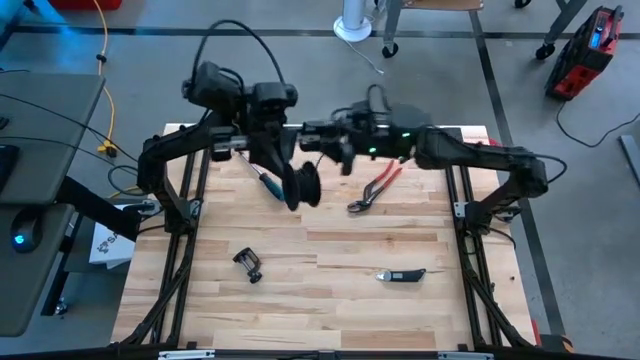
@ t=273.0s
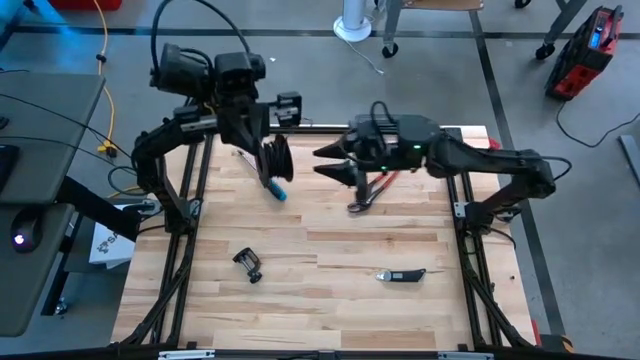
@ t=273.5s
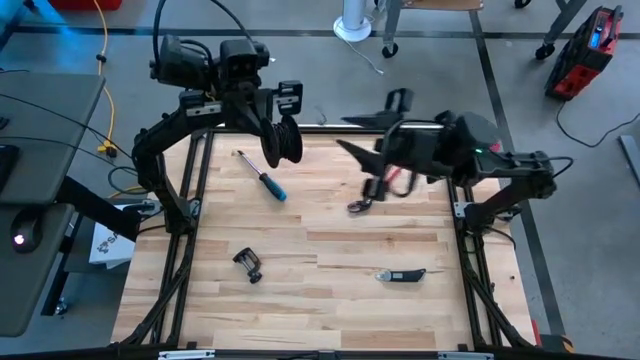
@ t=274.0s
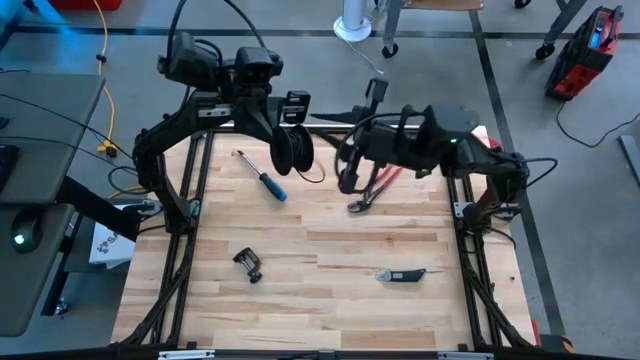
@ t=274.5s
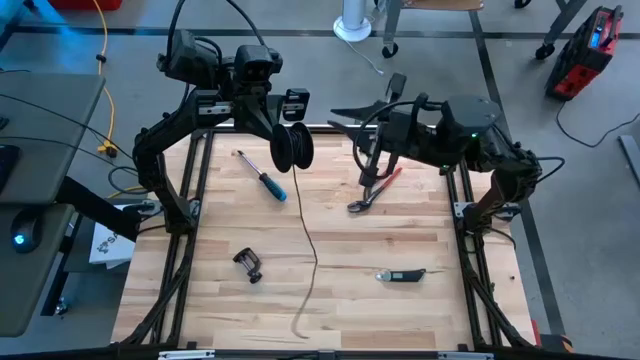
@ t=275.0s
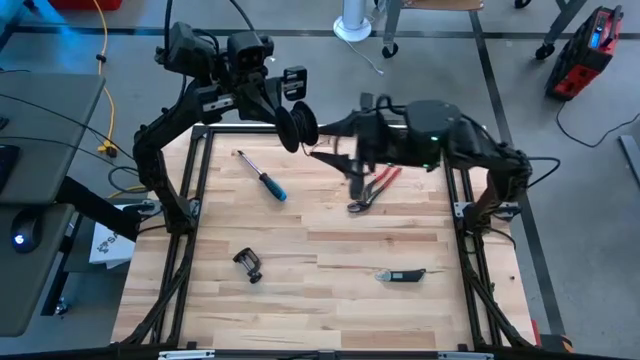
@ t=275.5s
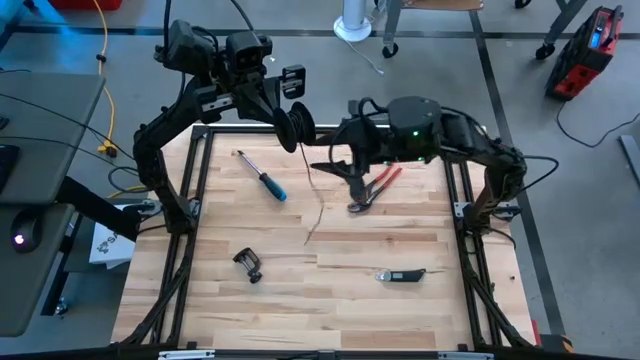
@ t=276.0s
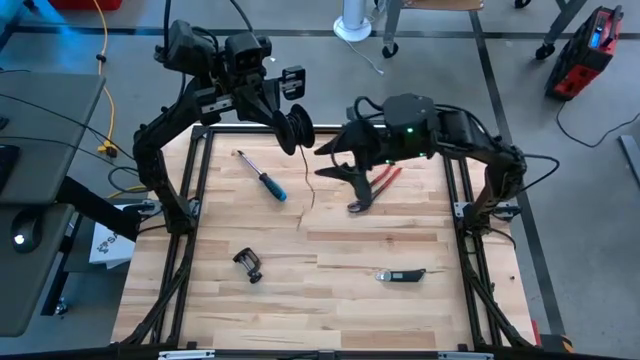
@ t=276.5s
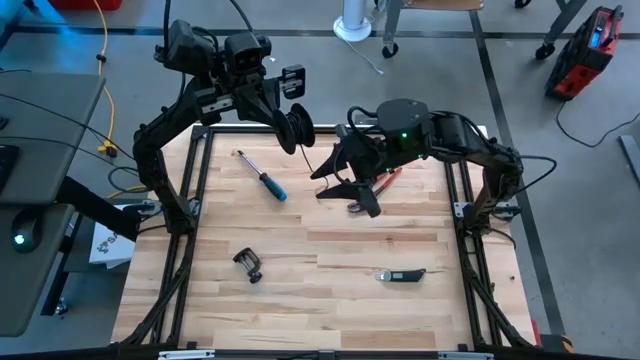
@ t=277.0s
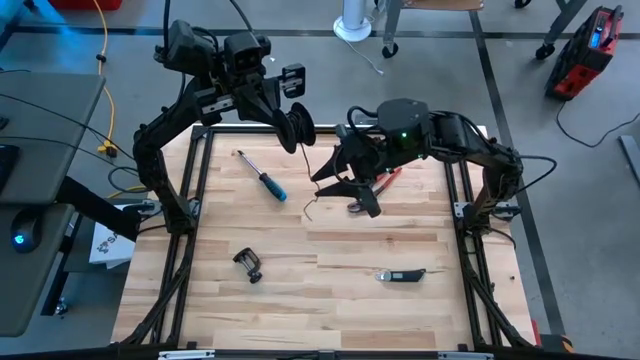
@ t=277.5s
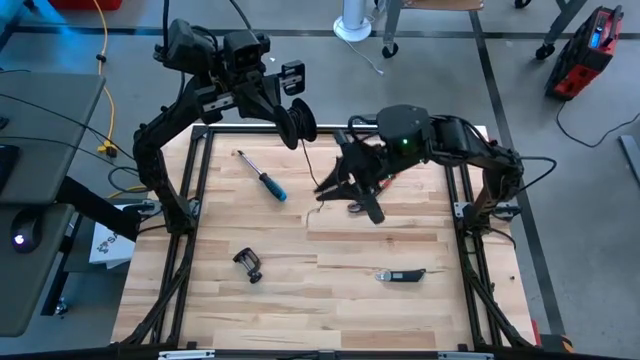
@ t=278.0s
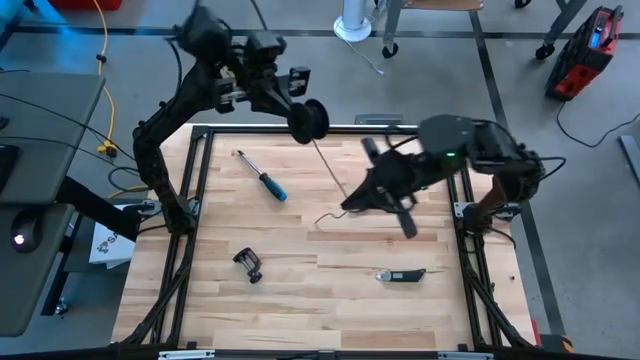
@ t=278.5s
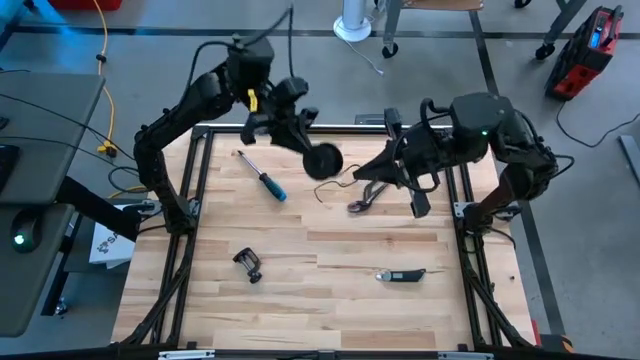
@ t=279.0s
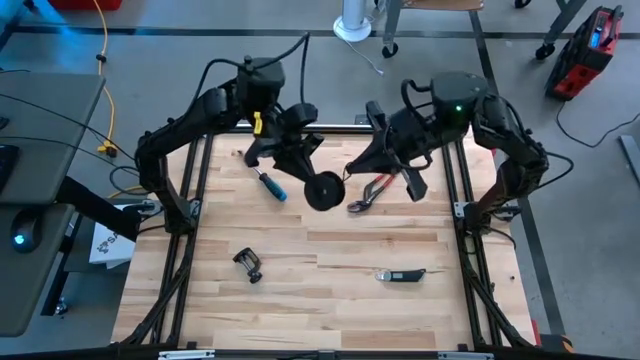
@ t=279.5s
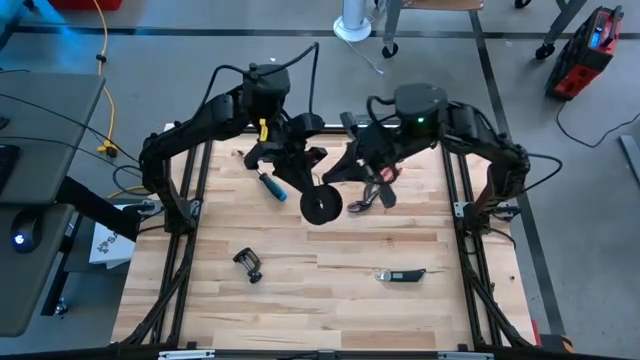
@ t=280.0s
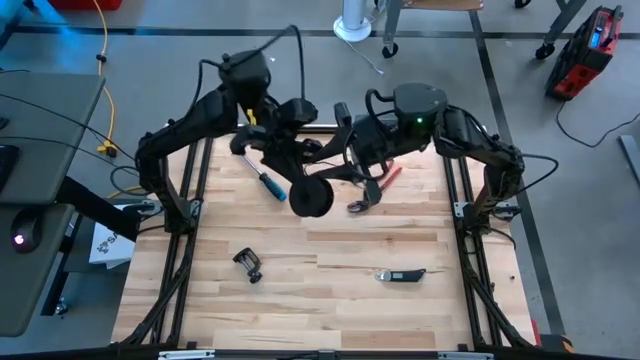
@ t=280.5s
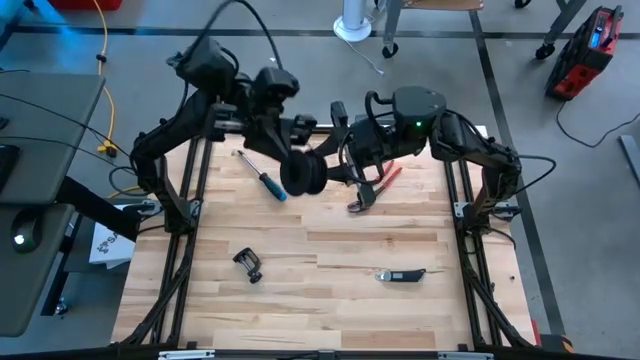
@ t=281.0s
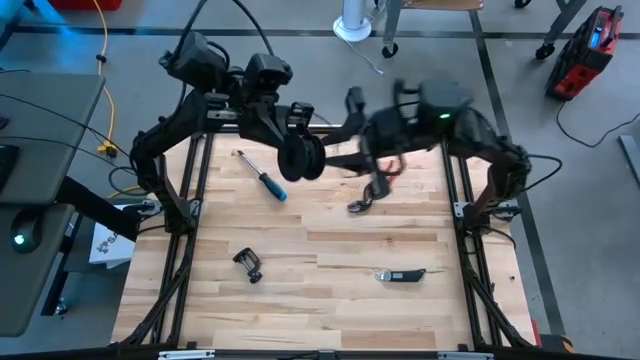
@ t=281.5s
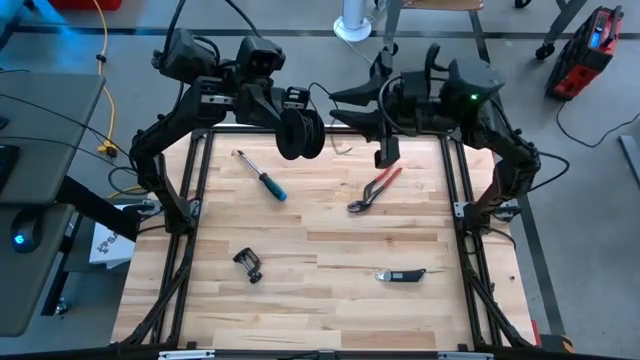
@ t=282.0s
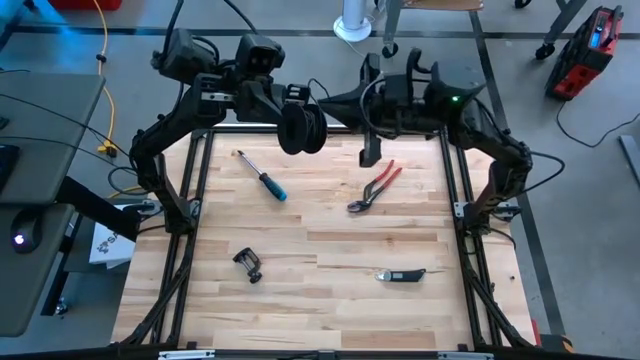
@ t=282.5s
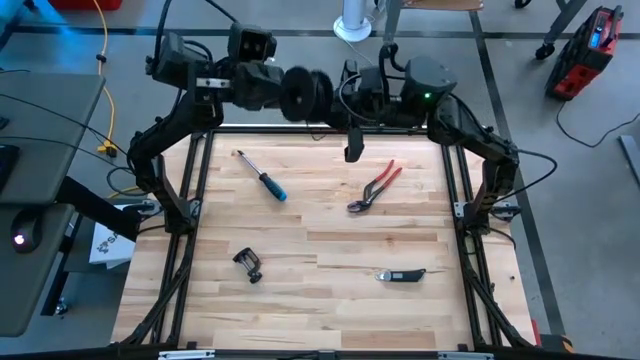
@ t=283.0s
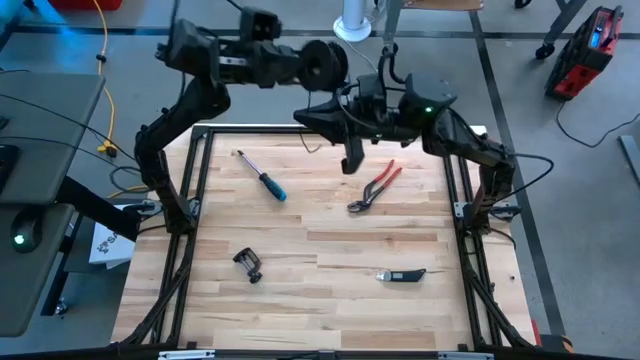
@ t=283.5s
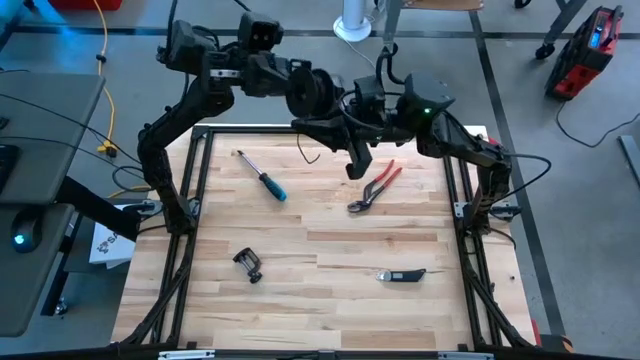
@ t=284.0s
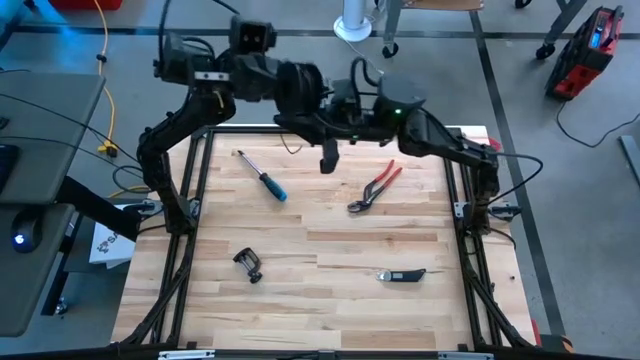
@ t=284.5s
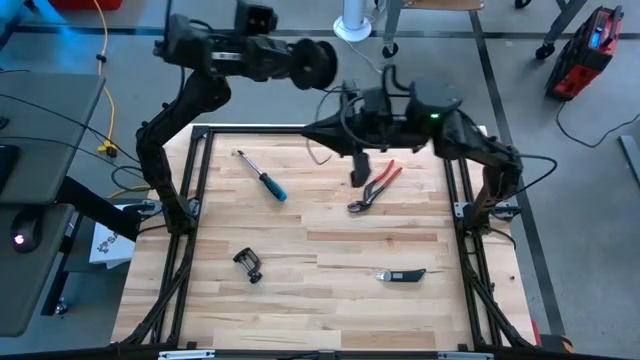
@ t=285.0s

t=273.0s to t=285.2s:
Task: Coil cords
Coil the black wire onto the black spool

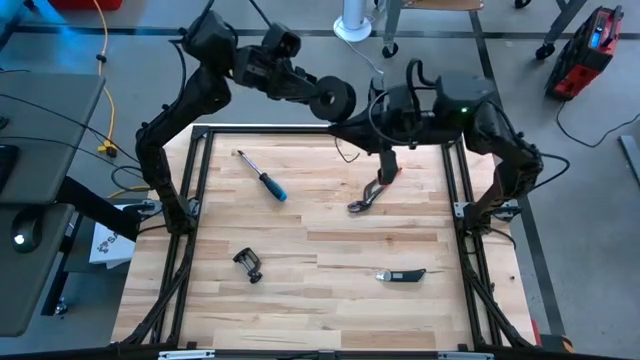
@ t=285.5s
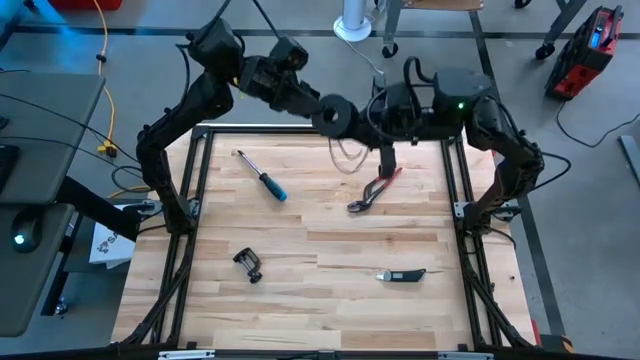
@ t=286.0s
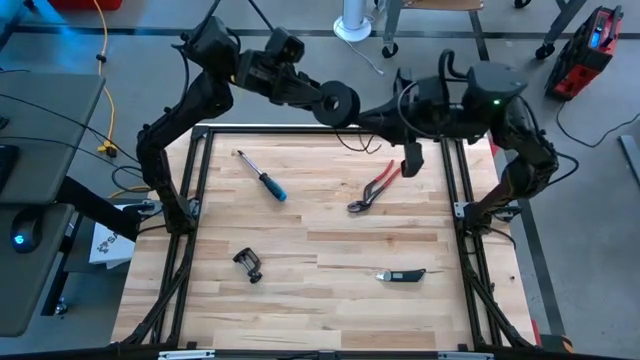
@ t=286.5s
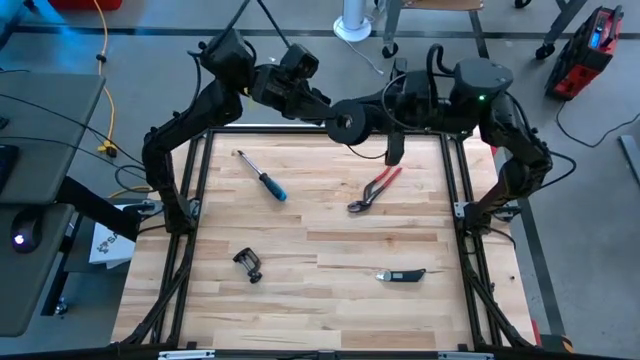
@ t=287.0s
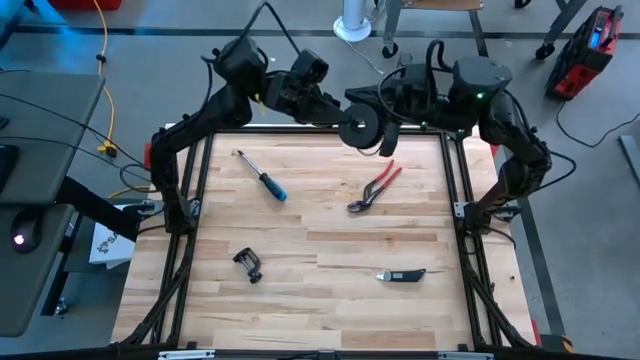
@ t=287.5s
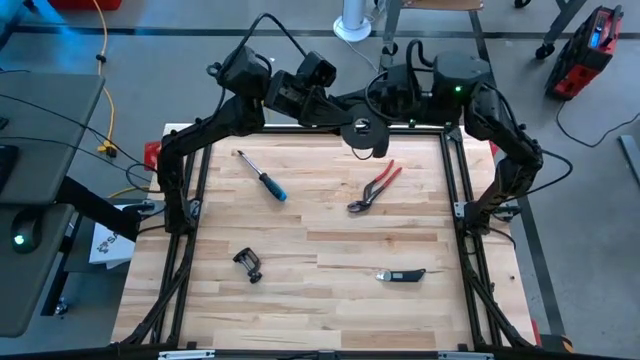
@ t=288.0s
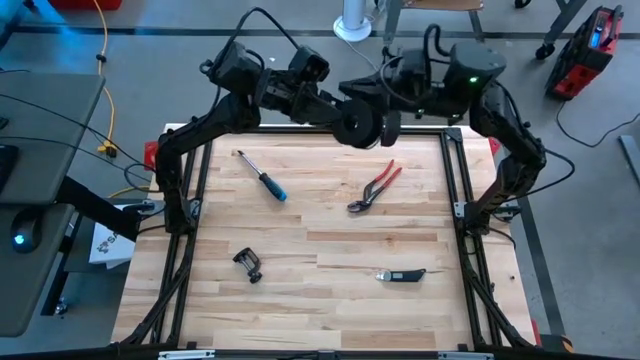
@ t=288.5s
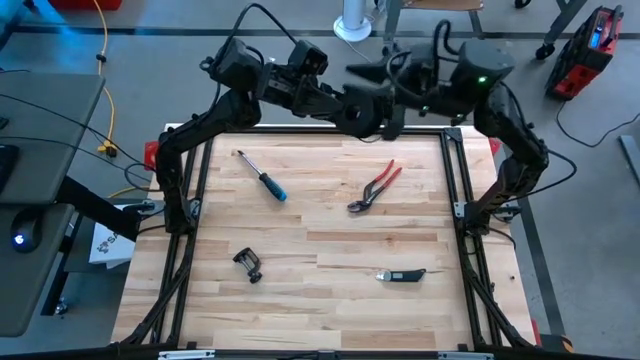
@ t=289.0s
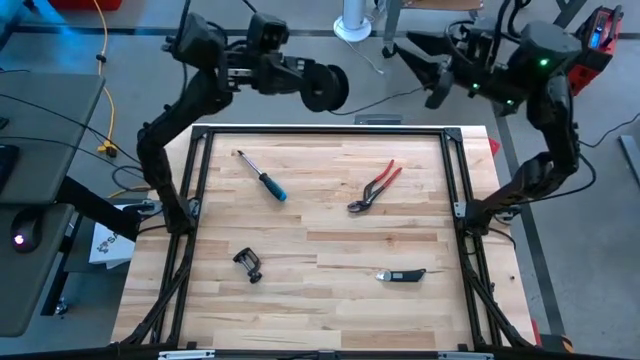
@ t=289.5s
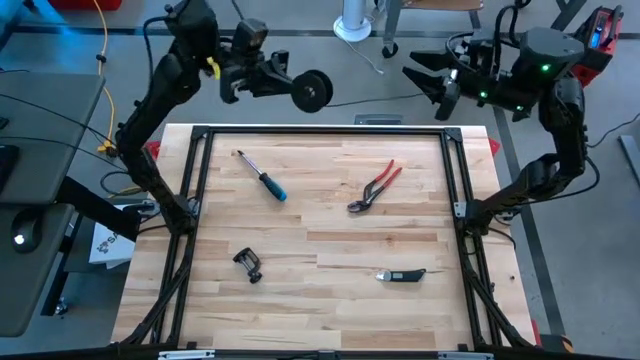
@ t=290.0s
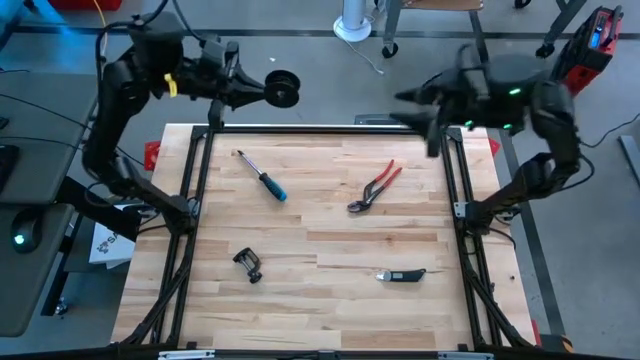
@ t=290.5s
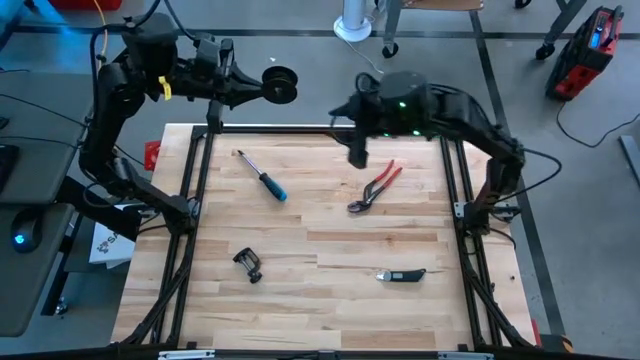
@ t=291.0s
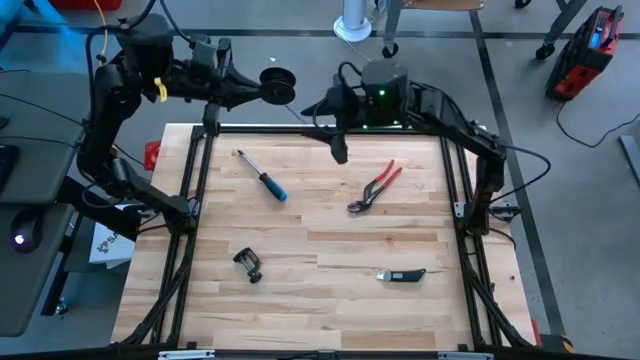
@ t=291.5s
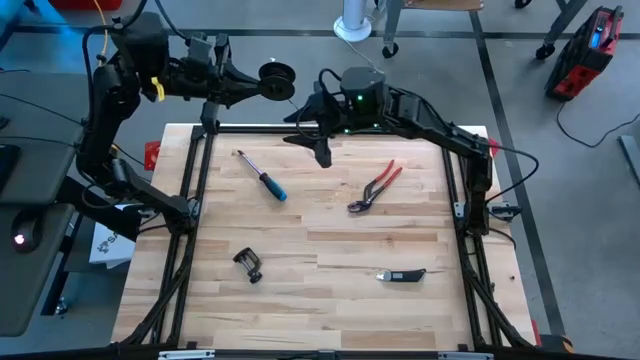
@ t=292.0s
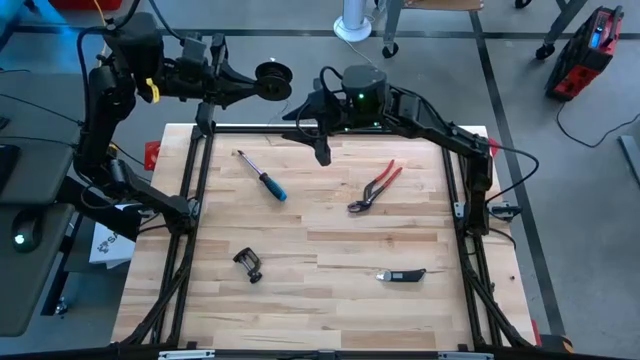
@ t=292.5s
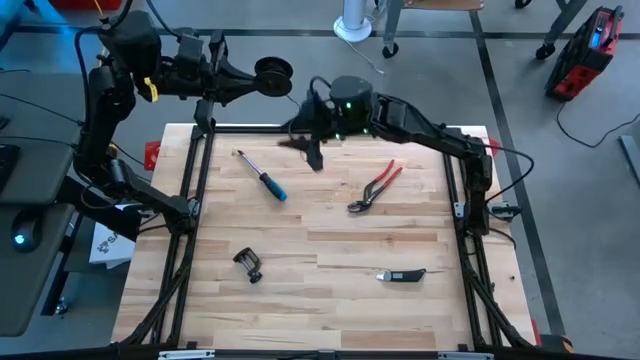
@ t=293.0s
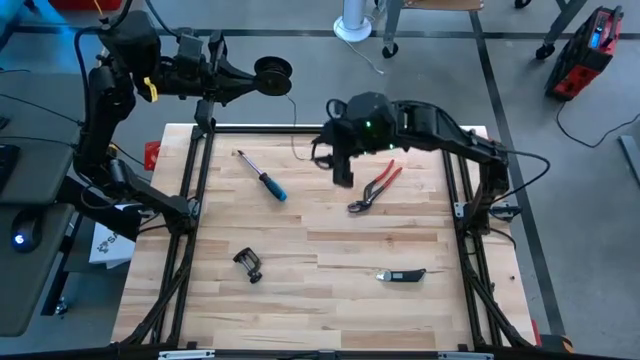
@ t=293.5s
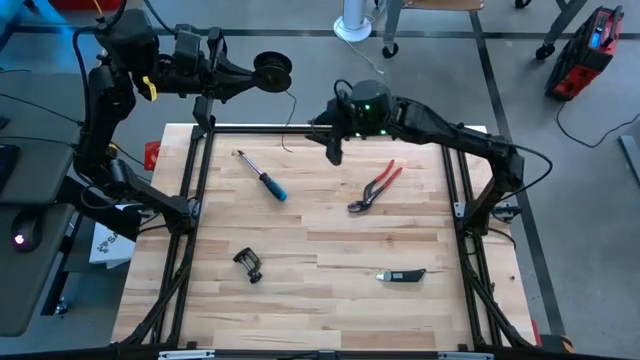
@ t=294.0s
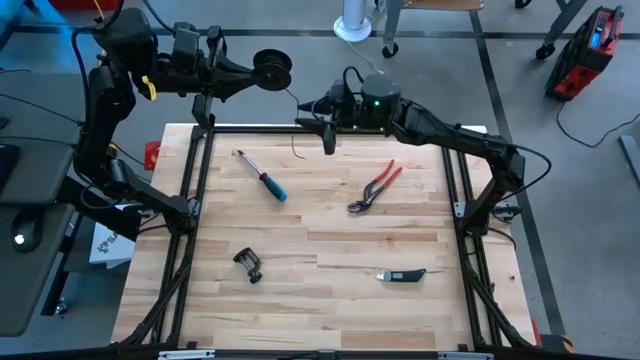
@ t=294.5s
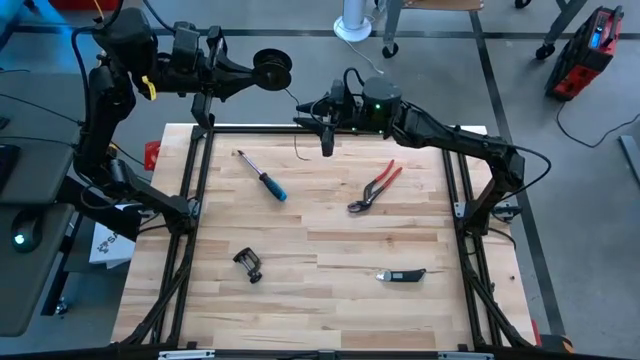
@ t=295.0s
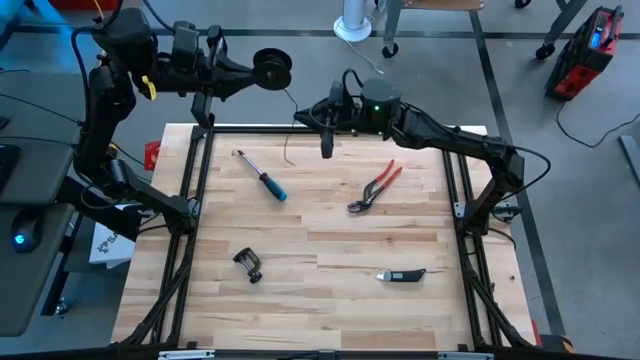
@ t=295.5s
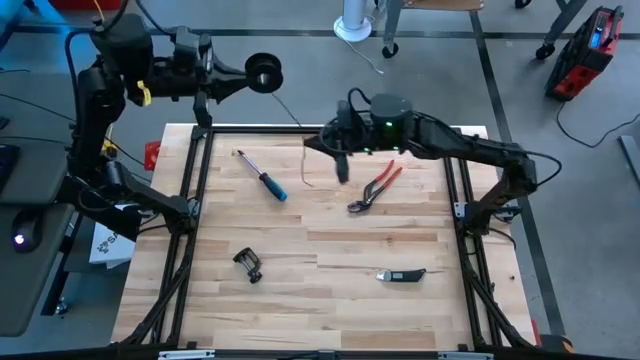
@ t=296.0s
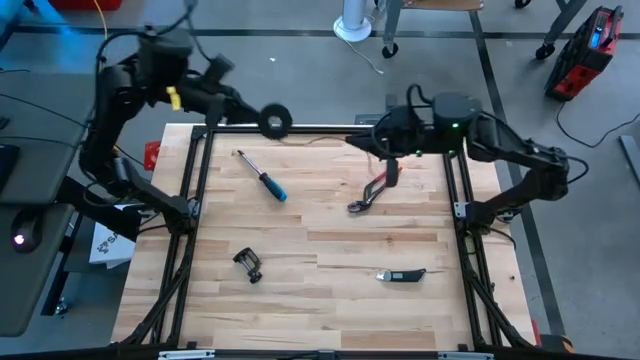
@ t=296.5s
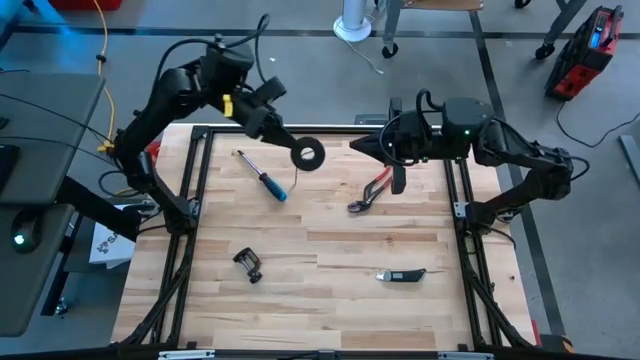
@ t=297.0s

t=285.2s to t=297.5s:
Coil the black wire onto the black spool
